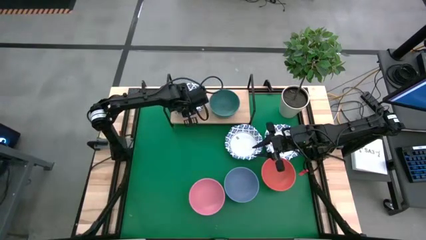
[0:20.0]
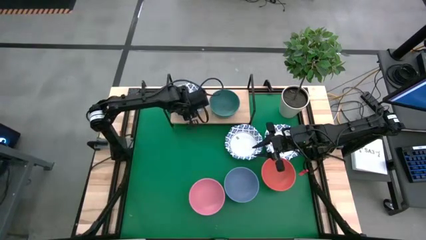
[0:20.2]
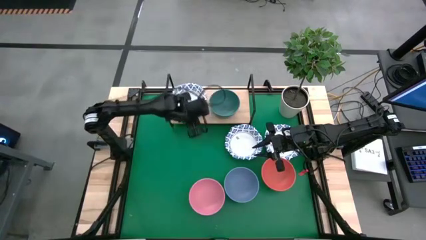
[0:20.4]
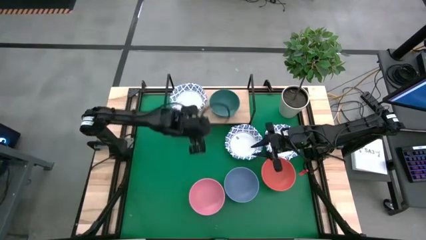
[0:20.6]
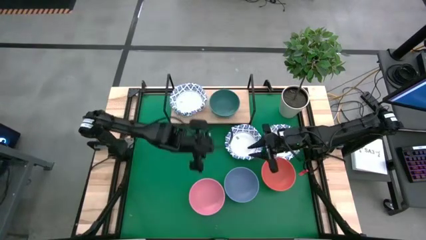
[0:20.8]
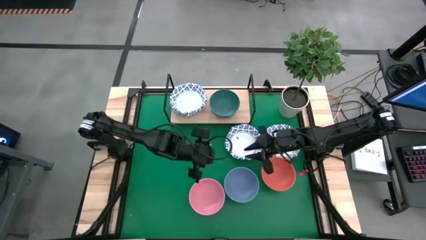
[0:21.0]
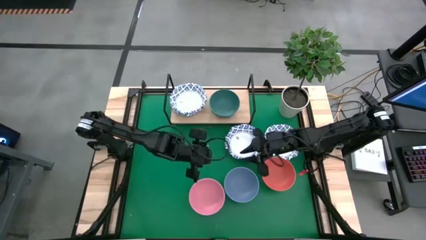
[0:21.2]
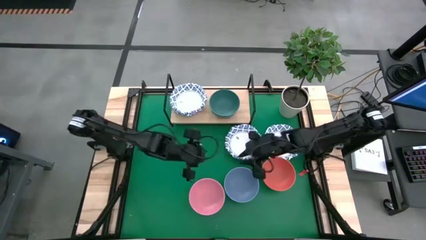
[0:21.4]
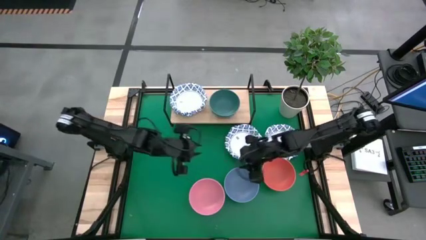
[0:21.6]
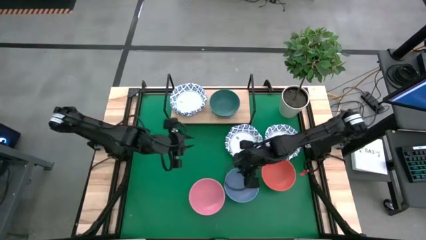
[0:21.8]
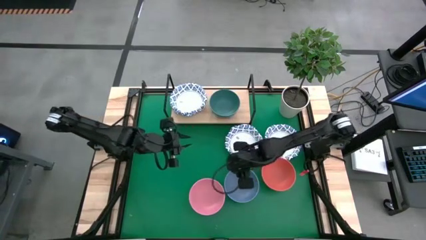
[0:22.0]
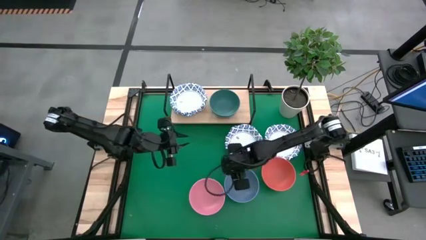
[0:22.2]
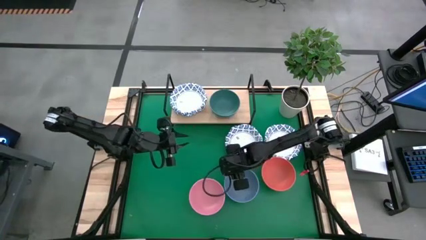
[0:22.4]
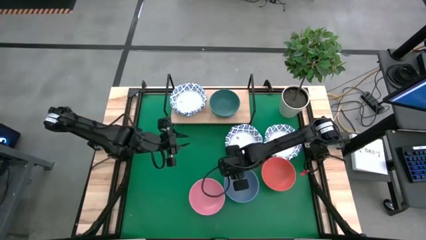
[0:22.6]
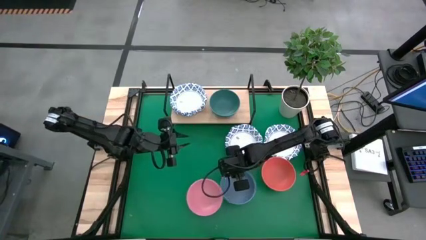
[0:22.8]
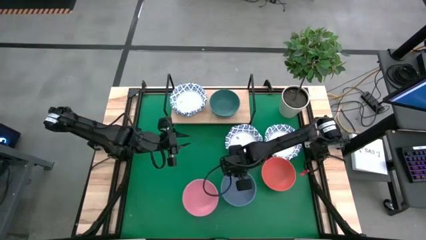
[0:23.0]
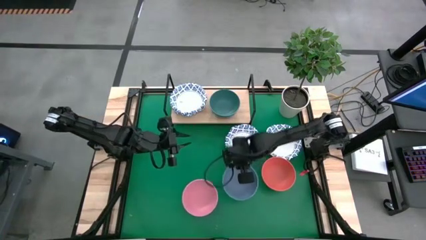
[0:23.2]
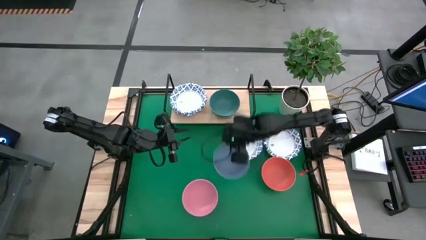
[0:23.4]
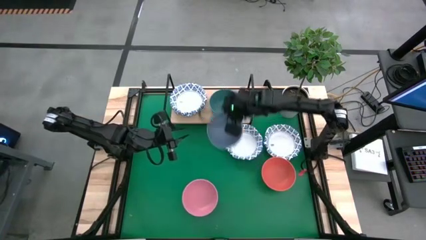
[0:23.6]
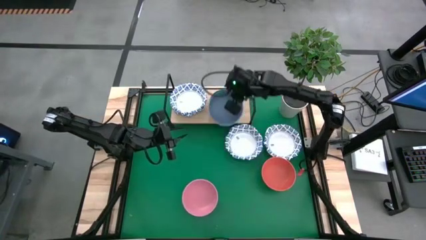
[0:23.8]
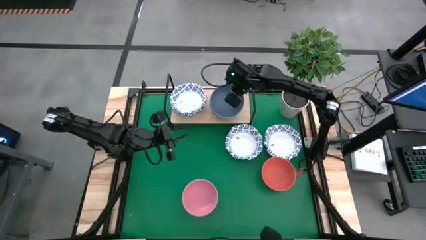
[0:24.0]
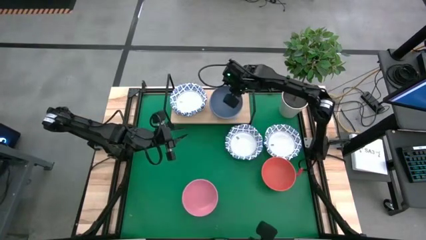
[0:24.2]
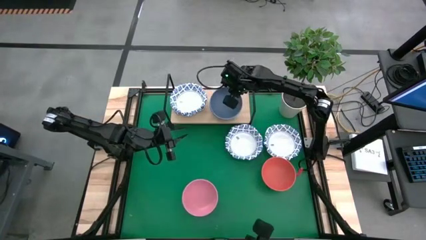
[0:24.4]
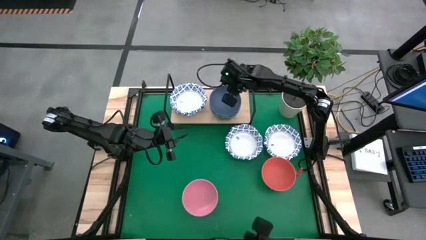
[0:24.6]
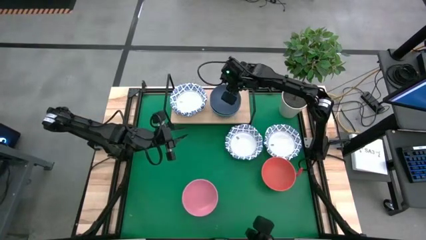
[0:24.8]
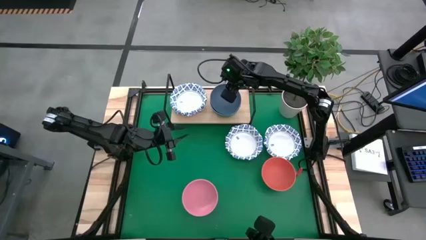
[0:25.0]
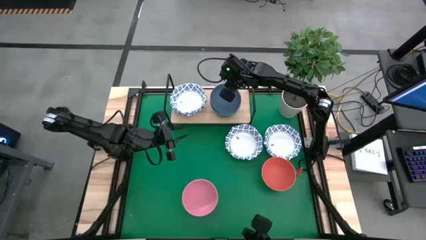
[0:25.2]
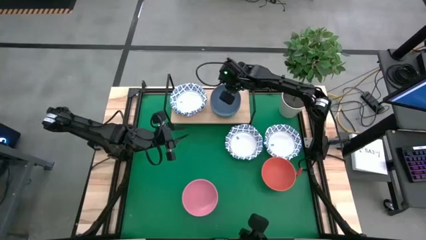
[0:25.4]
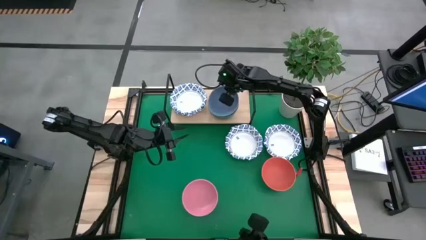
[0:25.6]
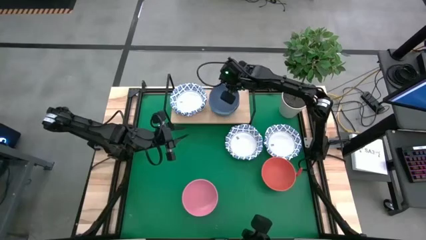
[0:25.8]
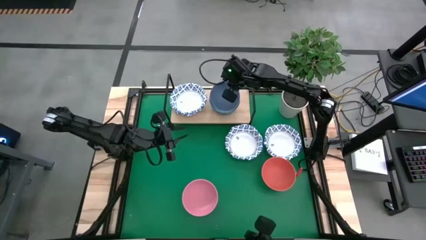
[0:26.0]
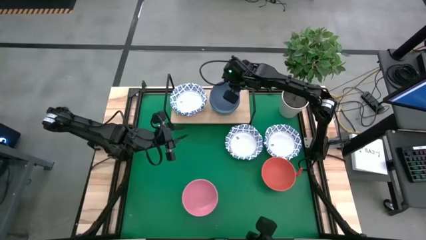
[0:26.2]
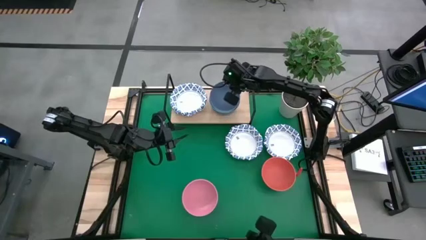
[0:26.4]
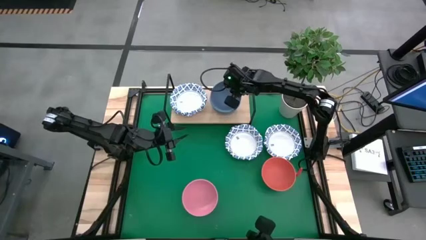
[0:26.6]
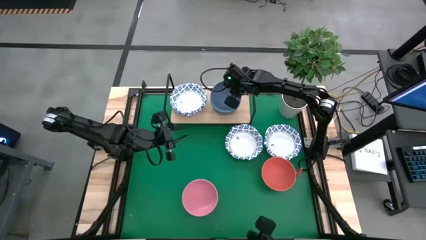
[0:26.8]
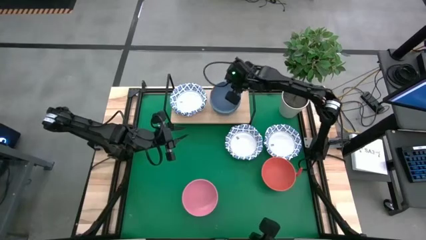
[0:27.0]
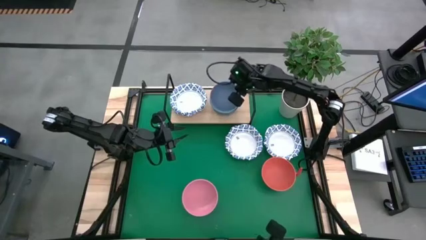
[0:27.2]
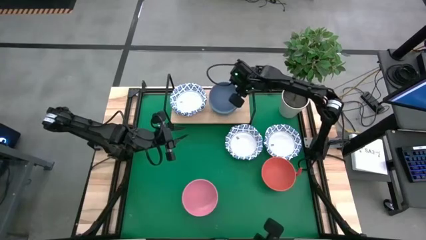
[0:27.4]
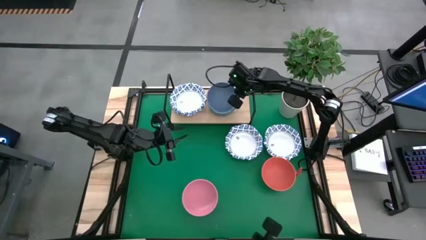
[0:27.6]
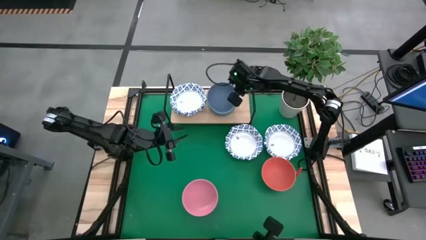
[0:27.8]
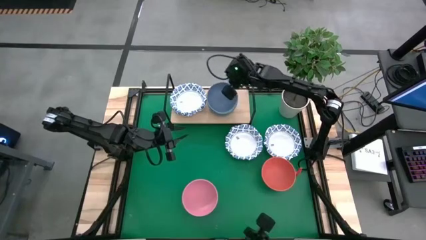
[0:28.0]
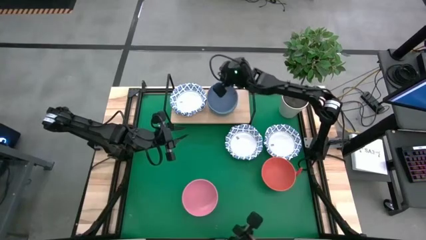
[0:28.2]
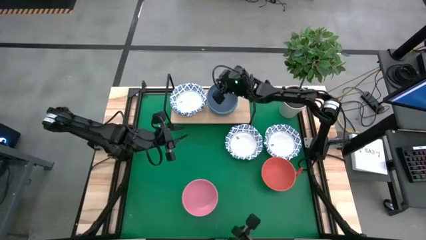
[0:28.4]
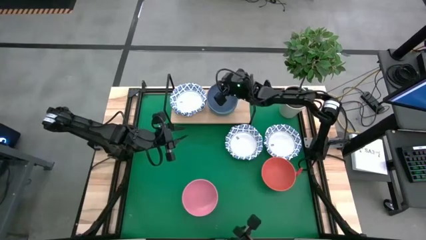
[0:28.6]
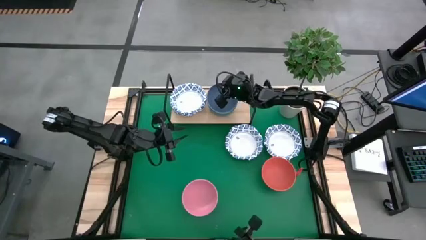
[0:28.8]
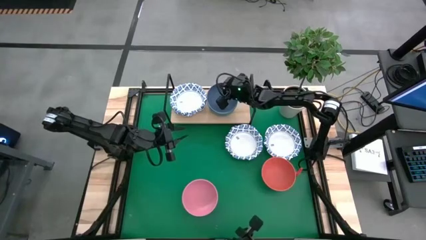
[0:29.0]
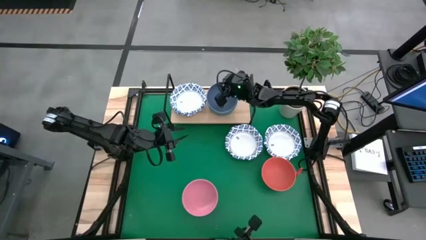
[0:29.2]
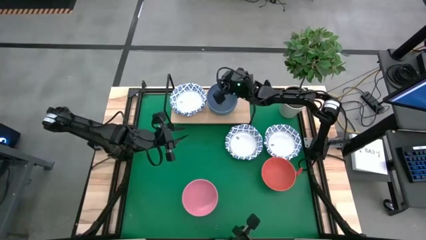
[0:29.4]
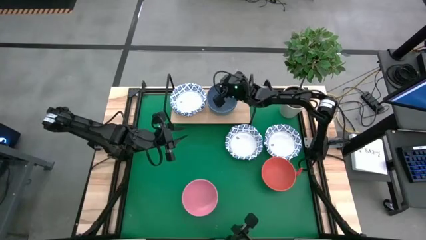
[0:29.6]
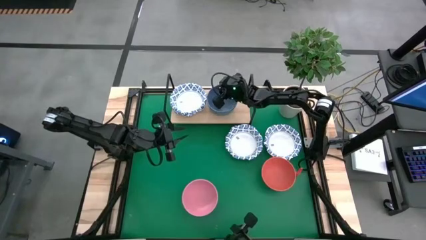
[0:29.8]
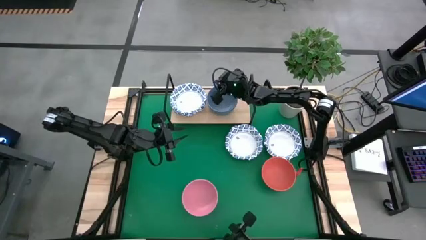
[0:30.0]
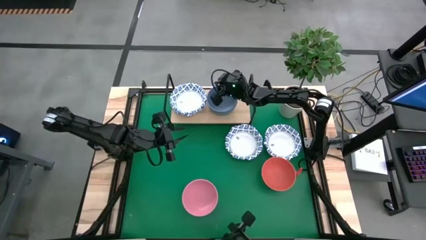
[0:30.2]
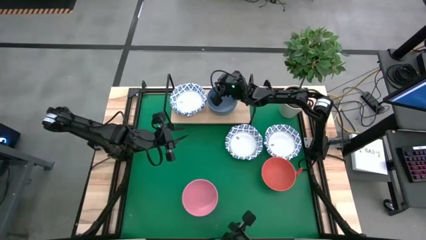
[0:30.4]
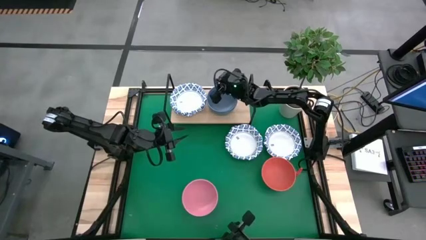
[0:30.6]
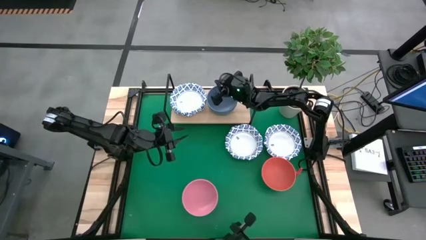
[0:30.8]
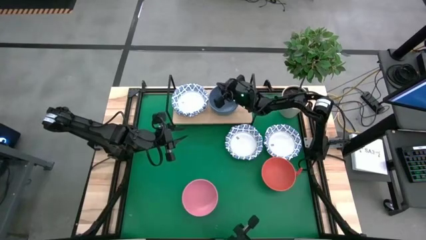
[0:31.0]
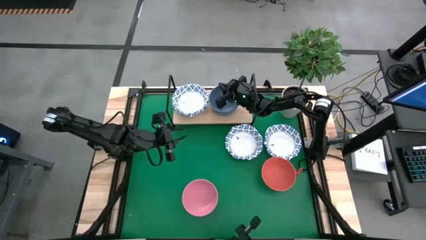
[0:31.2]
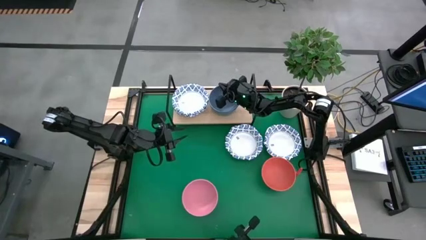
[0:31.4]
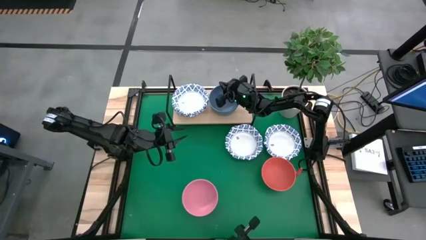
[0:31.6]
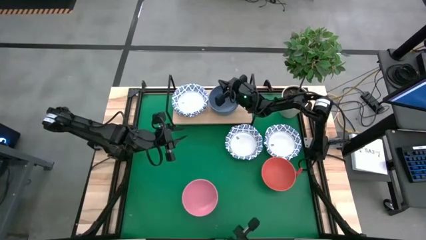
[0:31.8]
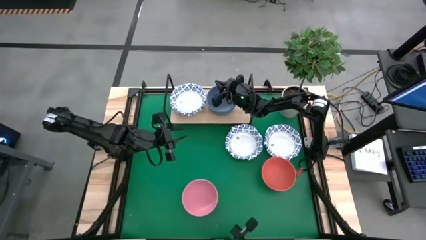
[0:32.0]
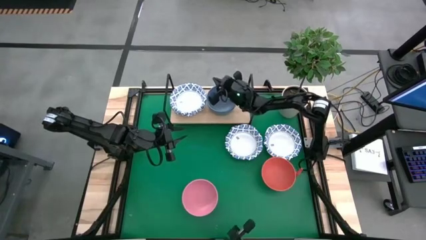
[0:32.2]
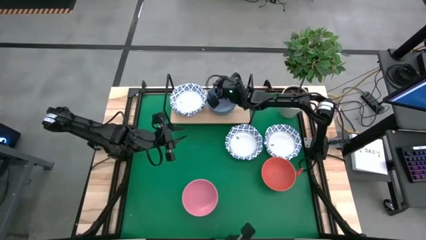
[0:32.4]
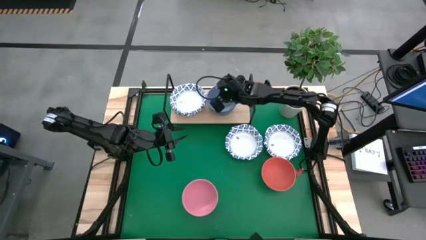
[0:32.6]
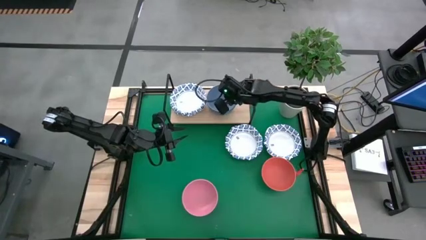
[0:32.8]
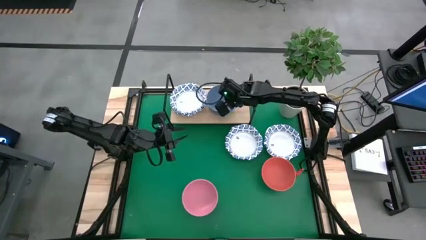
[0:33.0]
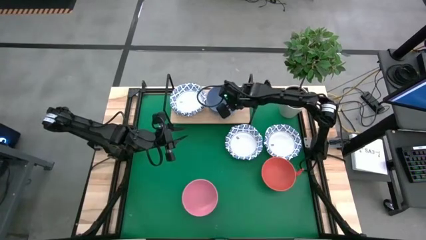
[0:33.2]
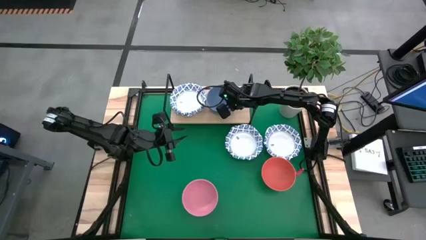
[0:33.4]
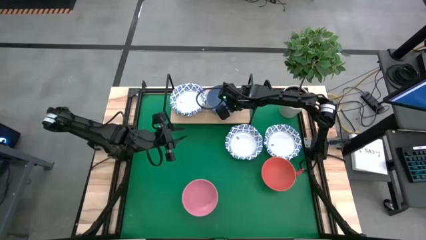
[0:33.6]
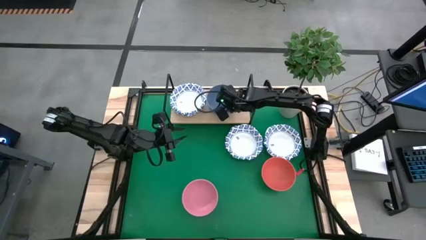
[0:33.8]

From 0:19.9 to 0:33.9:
Task: Place and stack bowls onto a shelf
Stack the blue bowl on top of the green bowl on the shelf
